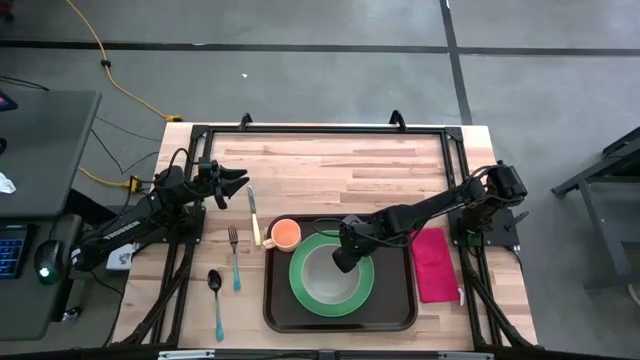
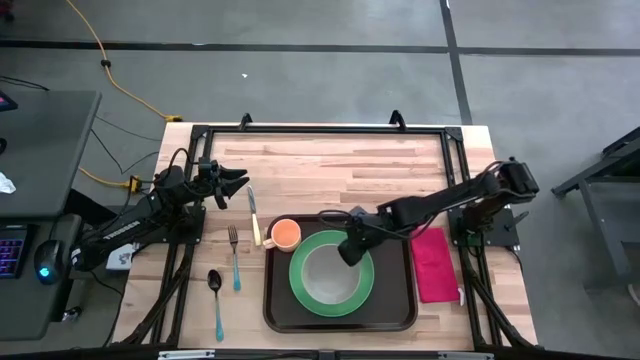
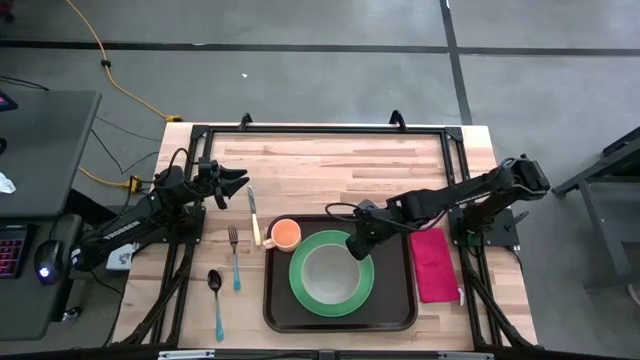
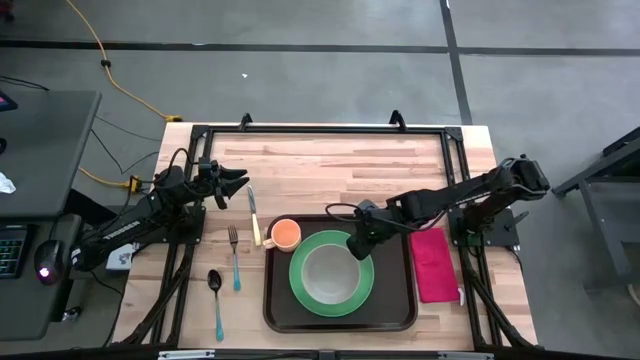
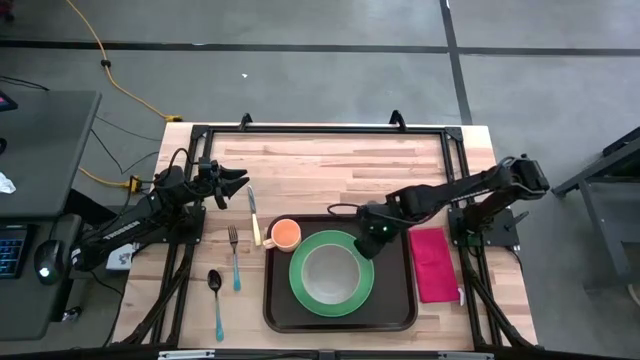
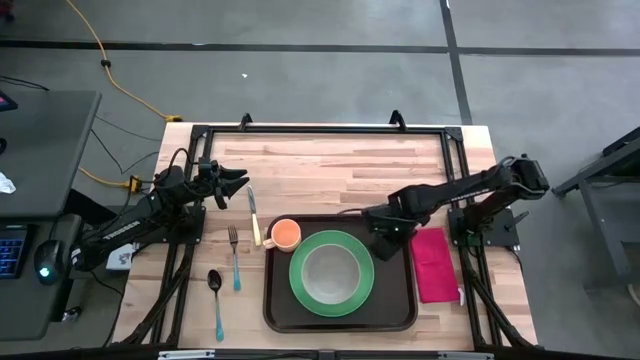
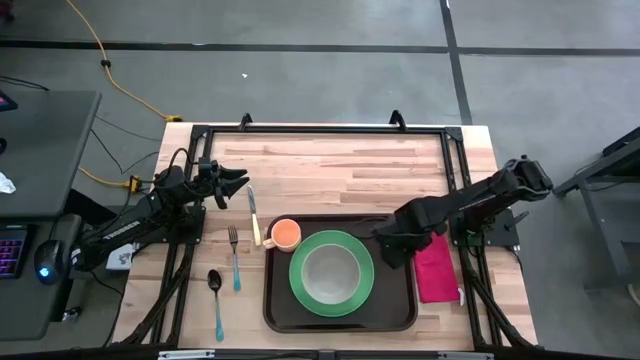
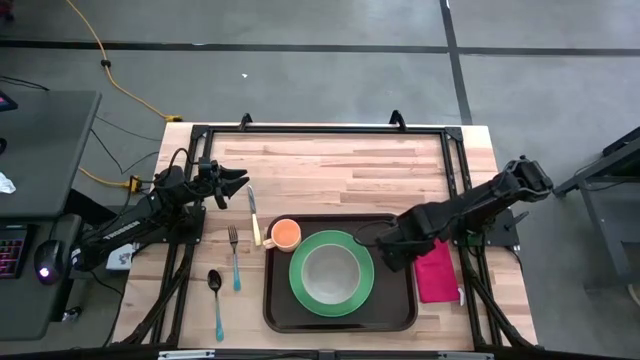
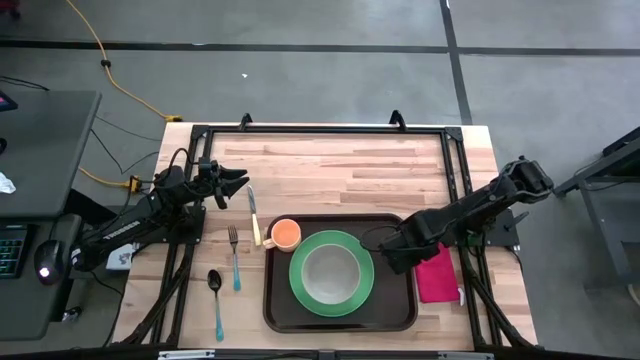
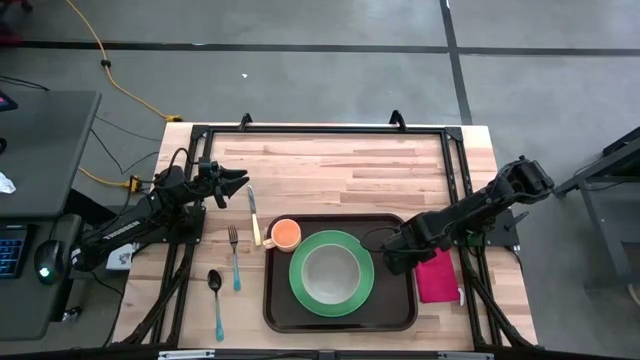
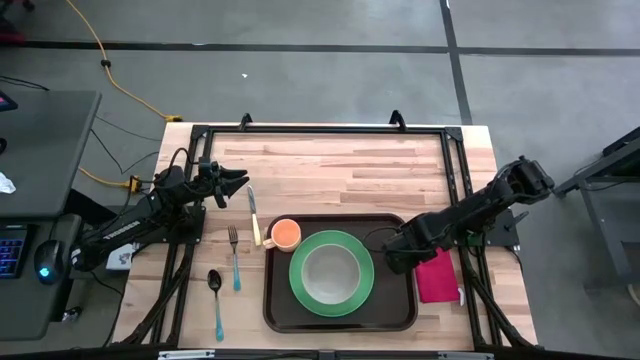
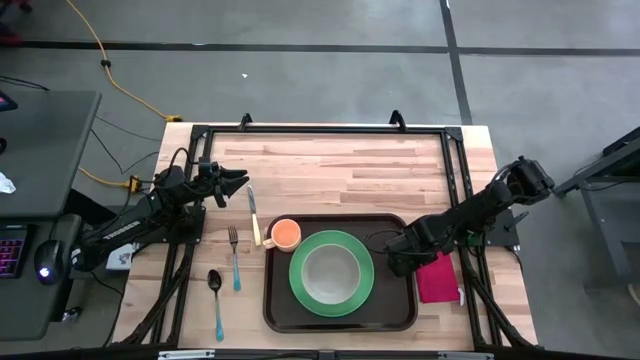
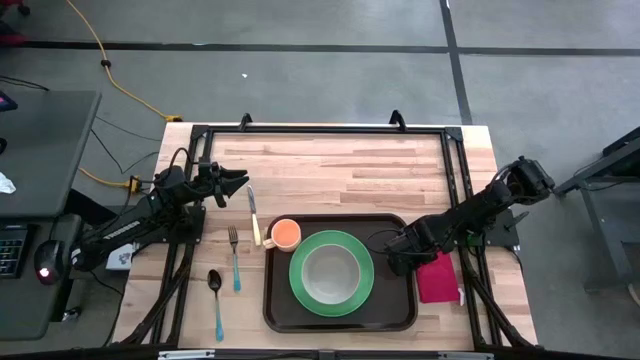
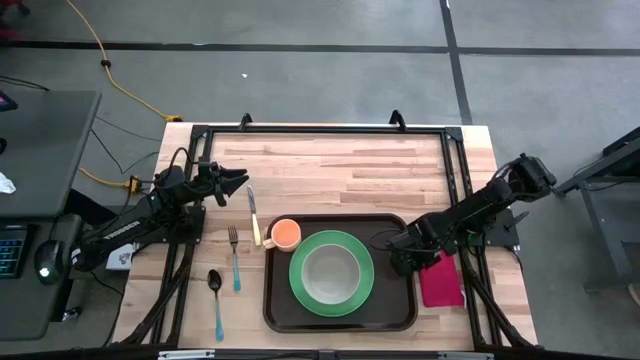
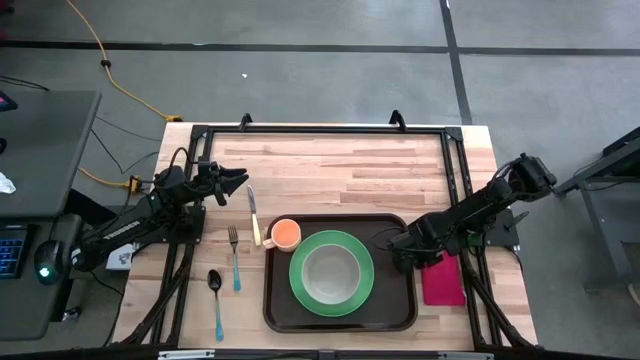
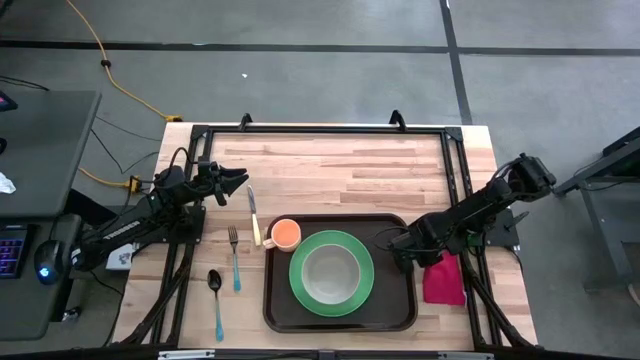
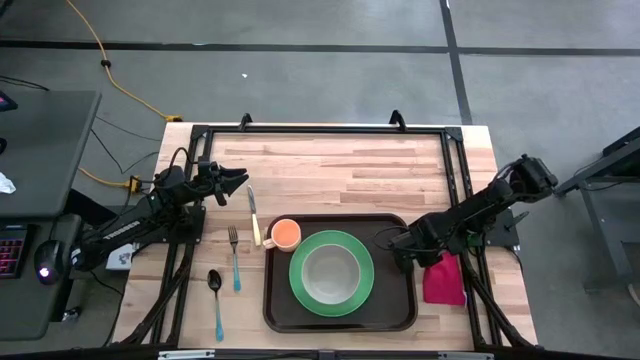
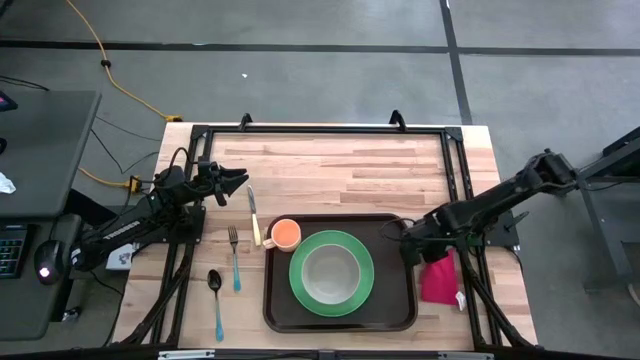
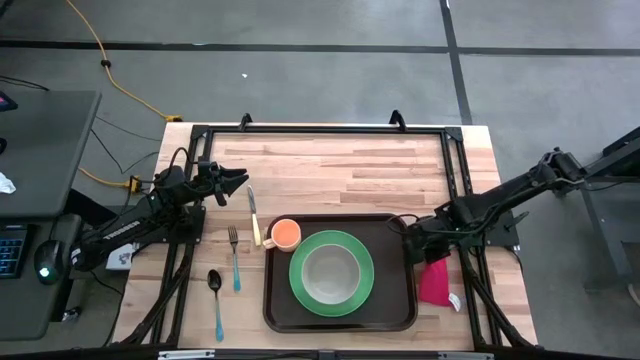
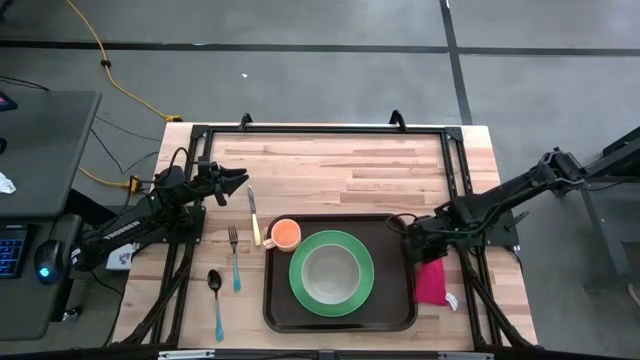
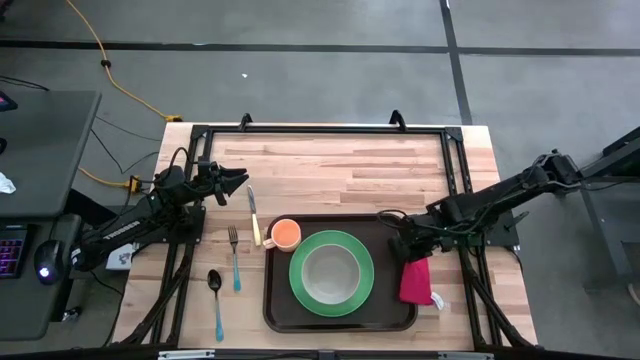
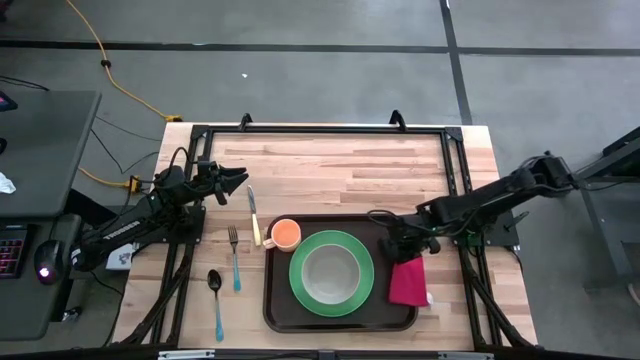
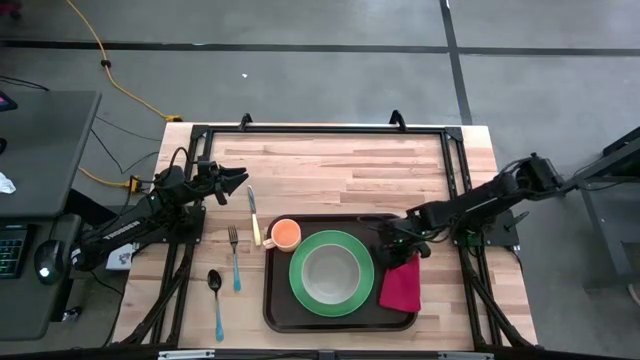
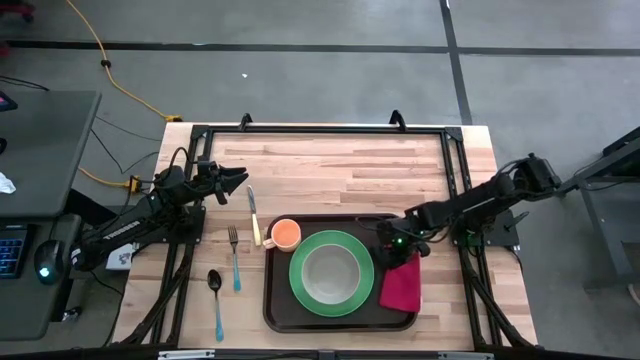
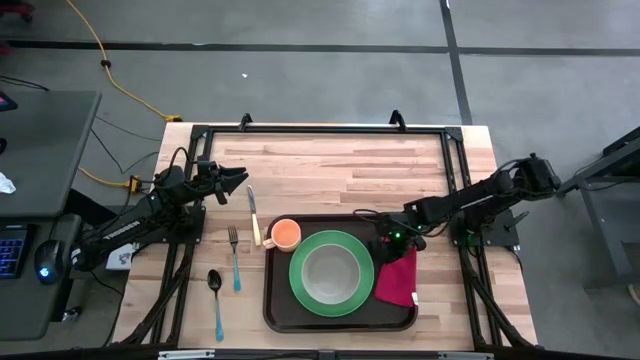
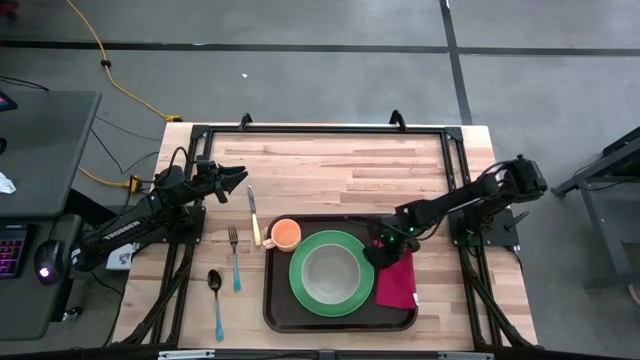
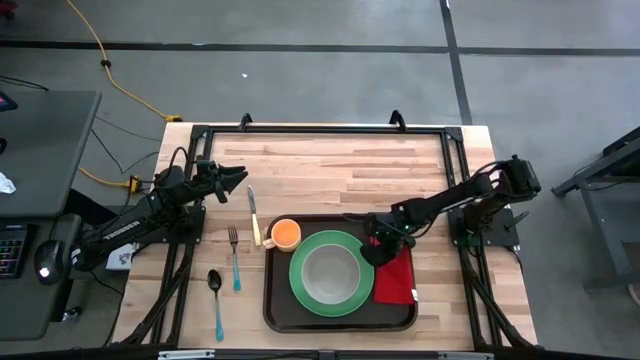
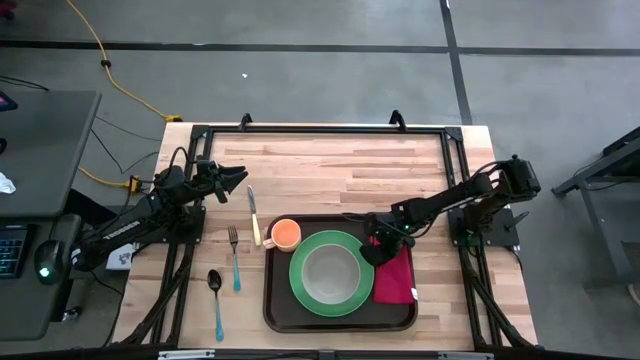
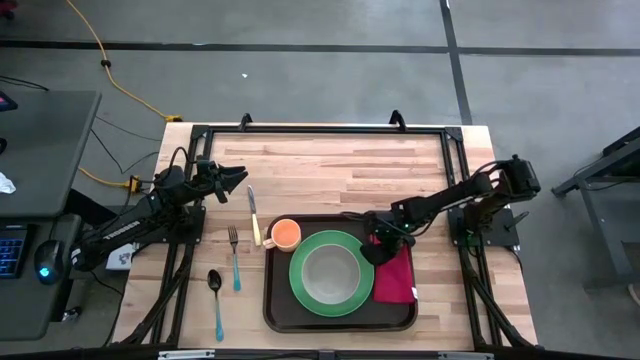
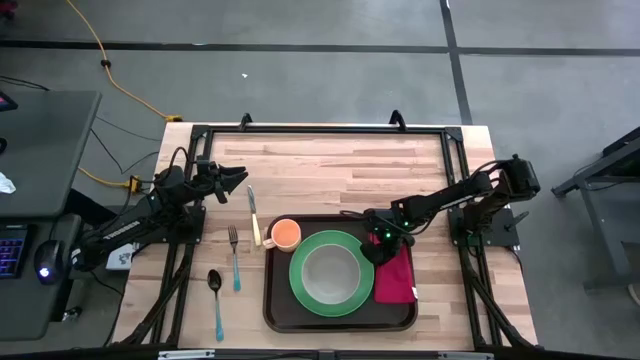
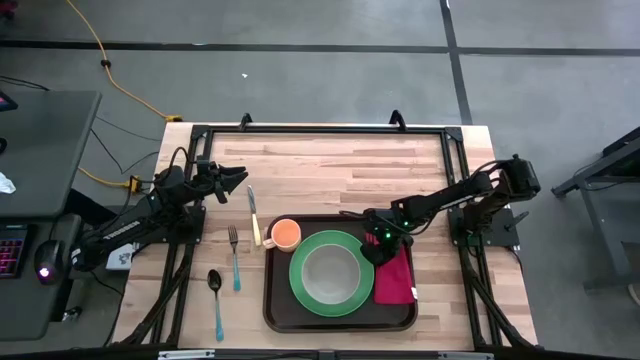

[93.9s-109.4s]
Task: Set up tray
Put the red napkin on the black tray to the right of the green plate

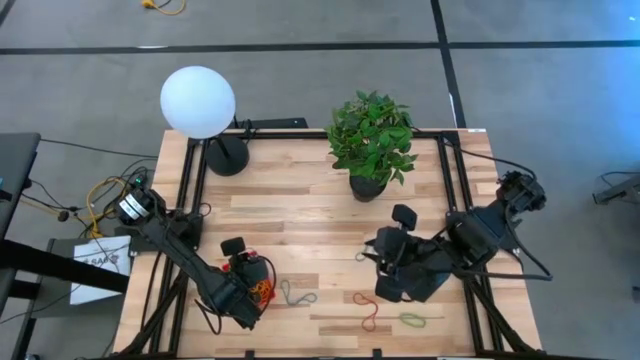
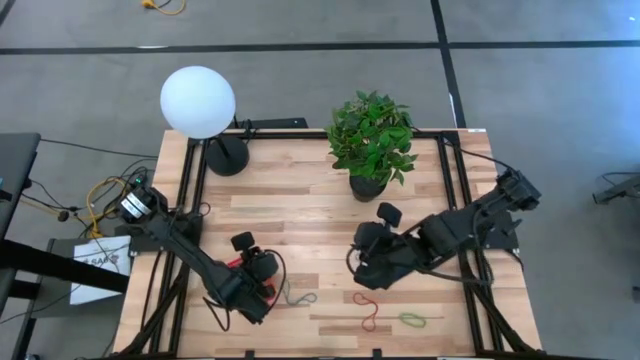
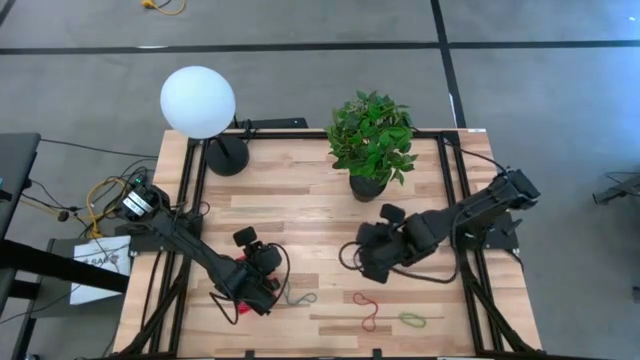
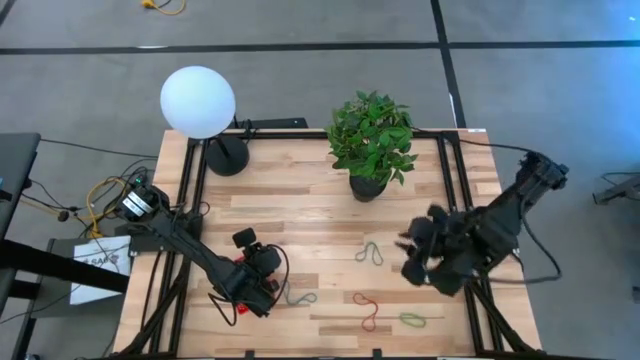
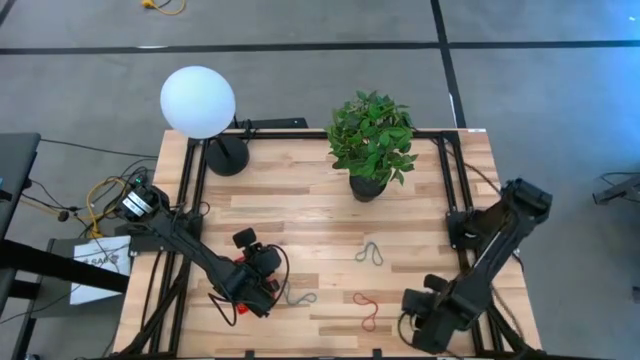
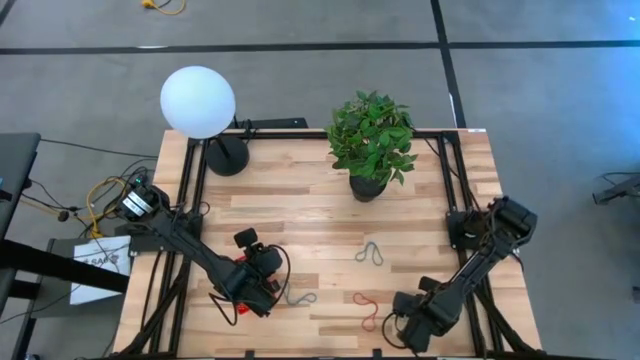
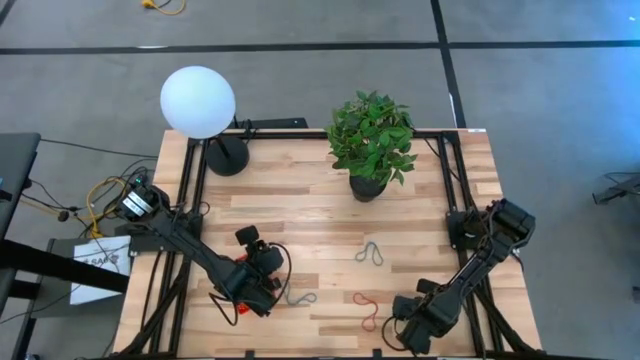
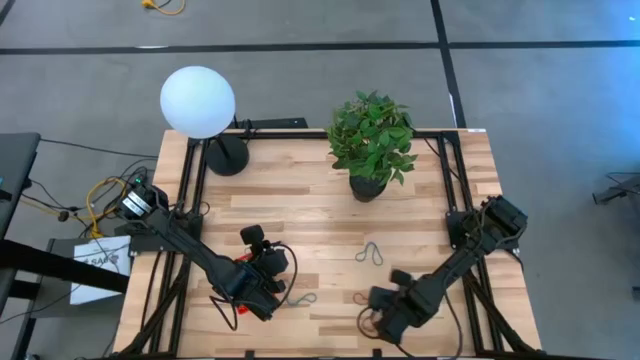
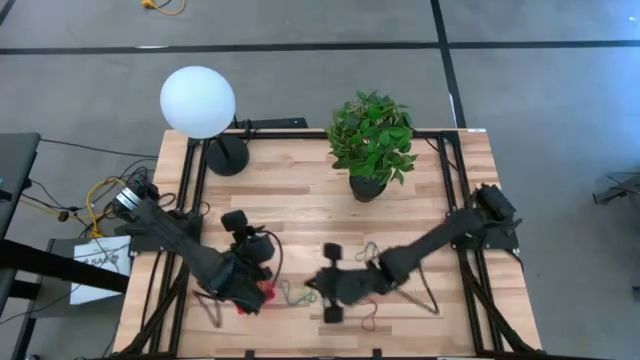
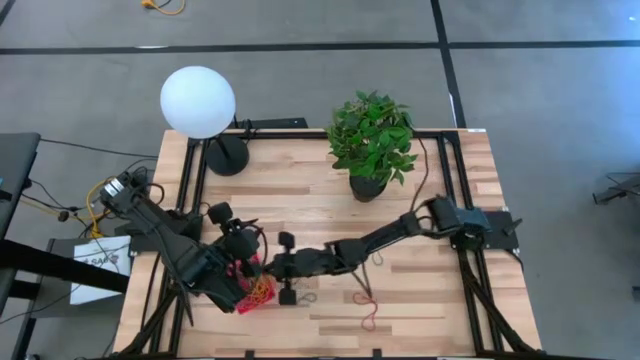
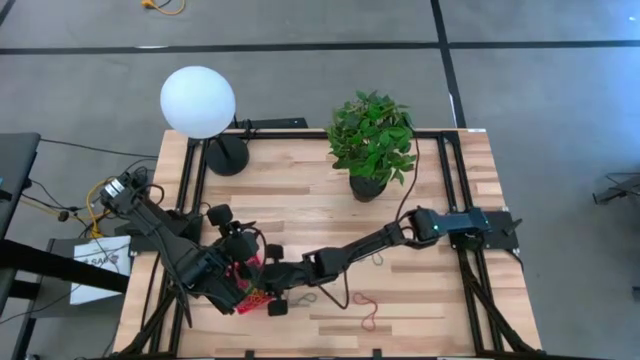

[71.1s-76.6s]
Task: Pick and place items into bin
Put the green rubber band into the red bin
